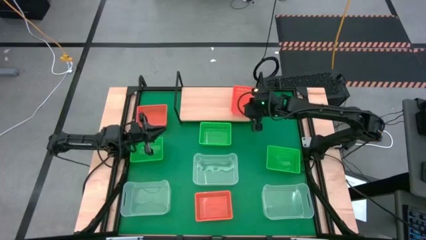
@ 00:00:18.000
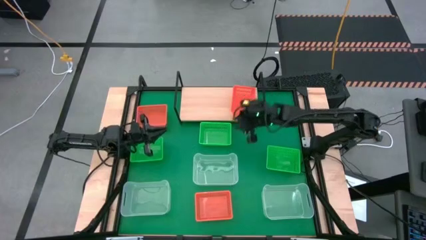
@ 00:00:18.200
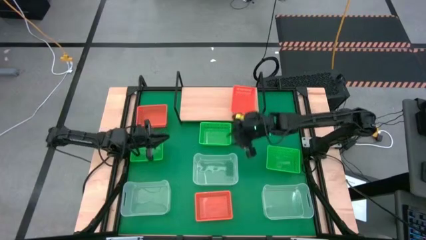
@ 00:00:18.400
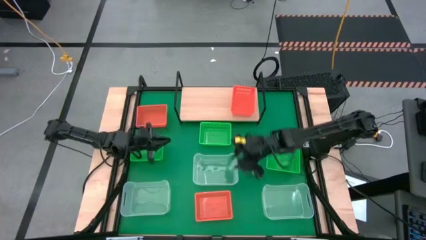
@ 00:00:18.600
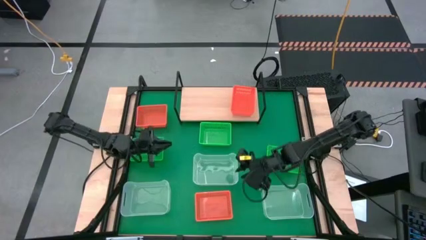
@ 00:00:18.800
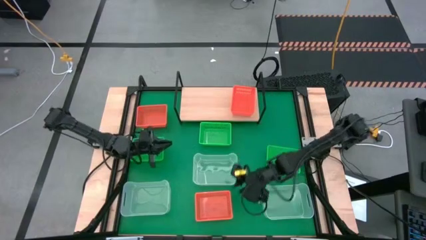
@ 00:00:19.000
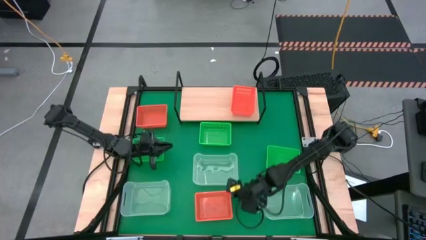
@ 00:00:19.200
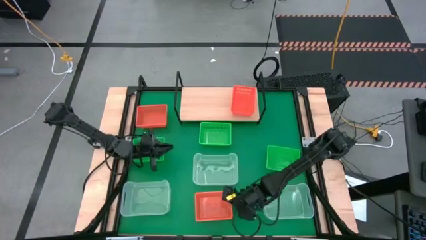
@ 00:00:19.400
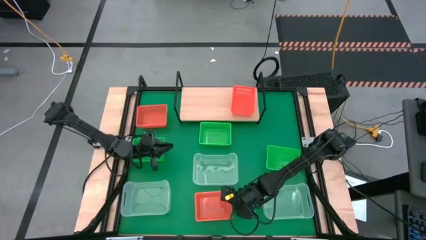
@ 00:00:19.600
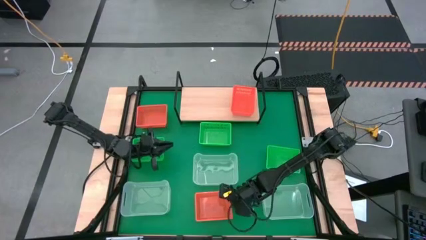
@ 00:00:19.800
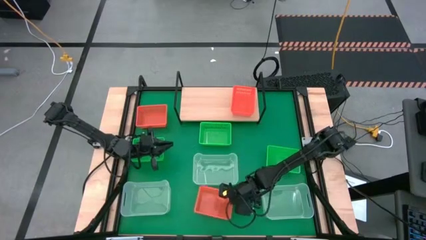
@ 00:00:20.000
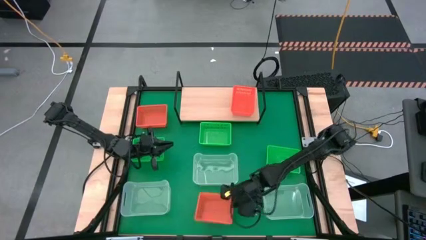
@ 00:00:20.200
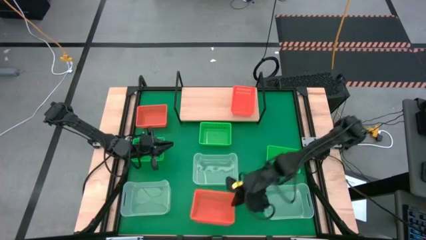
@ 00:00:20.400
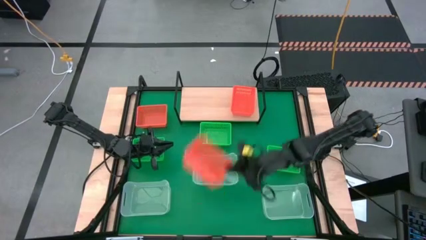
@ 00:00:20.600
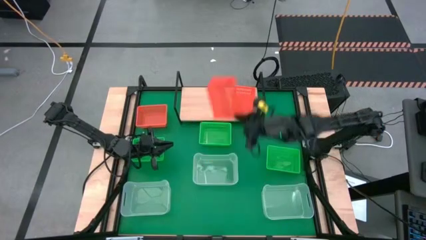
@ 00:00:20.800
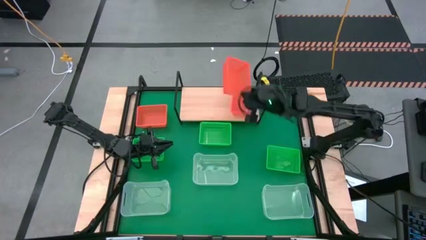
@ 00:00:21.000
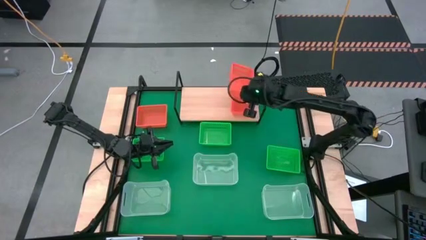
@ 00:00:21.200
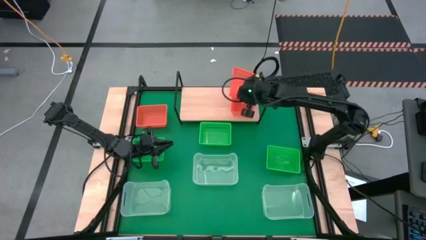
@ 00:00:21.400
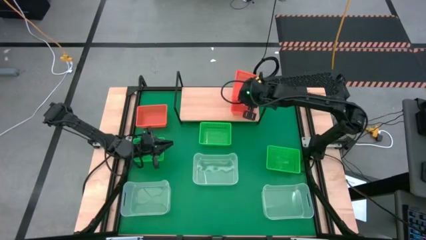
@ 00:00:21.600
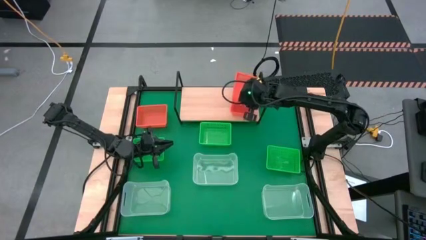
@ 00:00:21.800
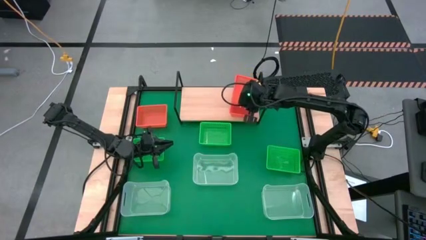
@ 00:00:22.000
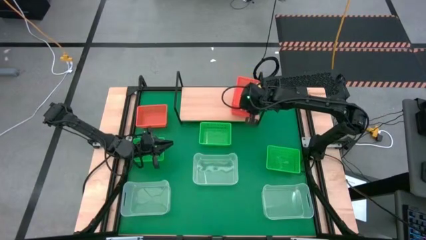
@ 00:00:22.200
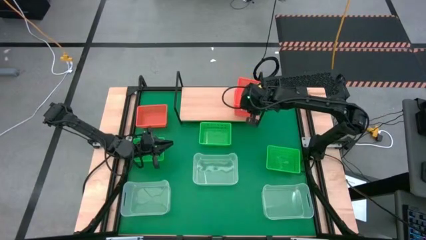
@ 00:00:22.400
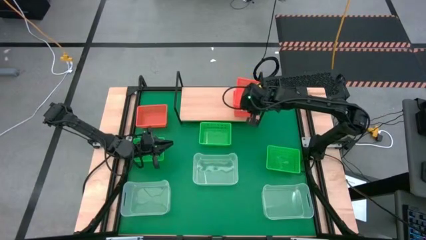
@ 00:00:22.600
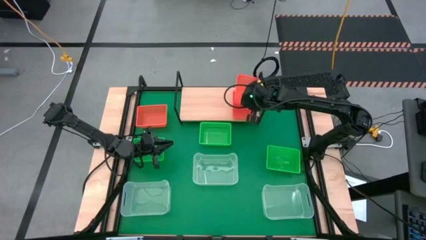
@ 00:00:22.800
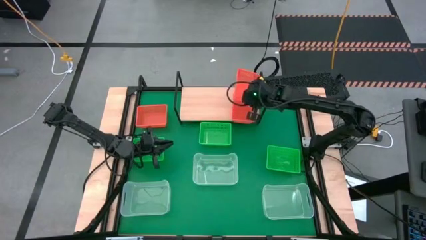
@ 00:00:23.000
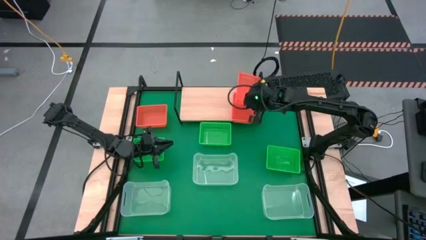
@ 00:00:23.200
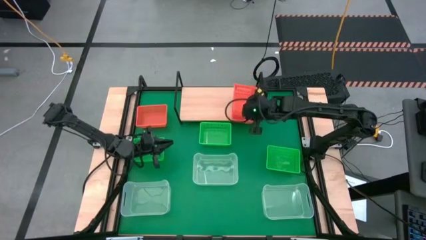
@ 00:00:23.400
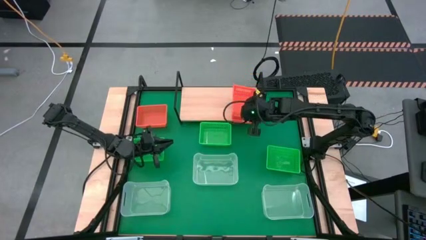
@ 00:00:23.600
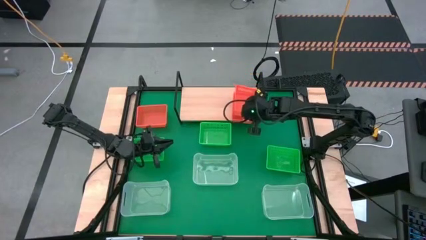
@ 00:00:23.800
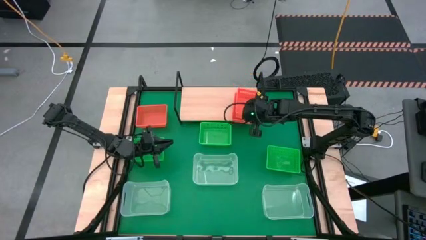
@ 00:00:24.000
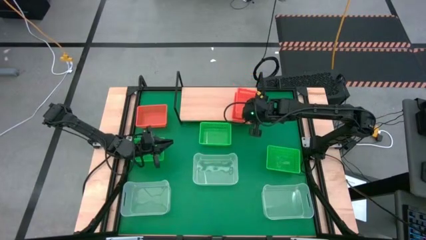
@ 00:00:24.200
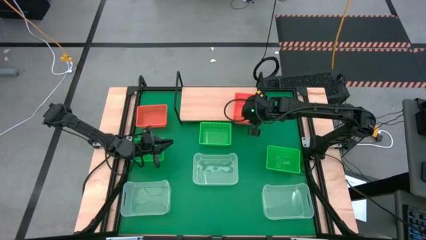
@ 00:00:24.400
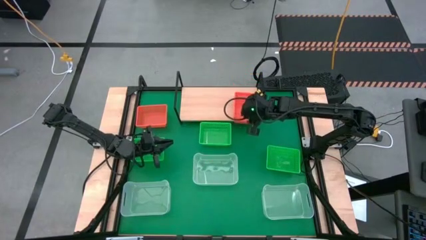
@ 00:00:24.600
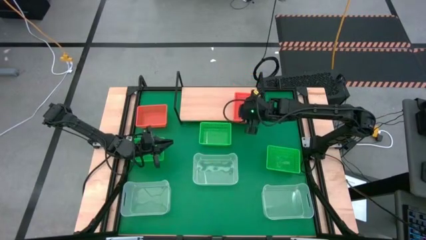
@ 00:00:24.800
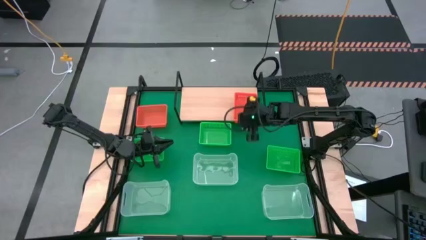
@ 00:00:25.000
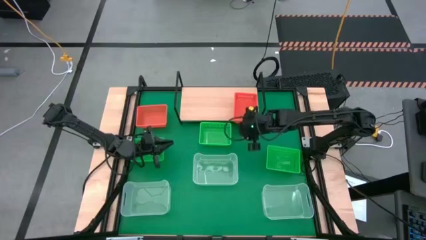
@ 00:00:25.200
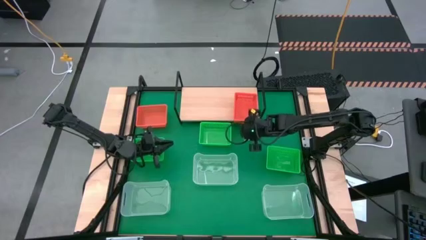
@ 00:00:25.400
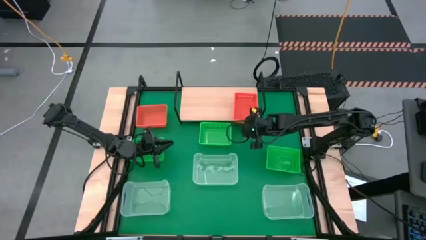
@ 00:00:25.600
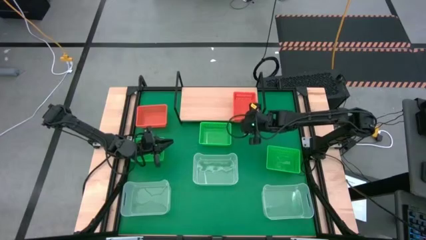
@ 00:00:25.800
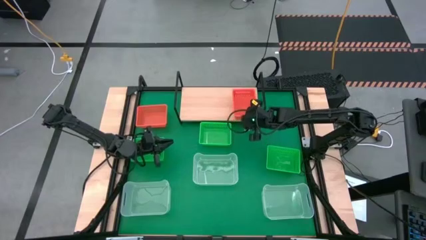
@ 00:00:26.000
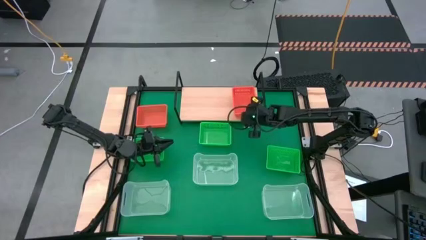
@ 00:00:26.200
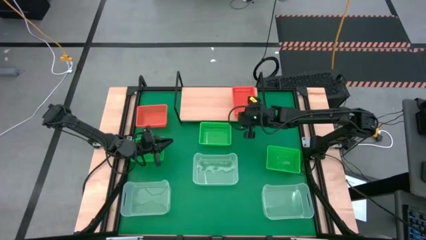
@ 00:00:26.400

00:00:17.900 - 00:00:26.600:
Task: Stack baskets on shelf by color
Stack the bottom orange bin on top of the orange bin on the shelf

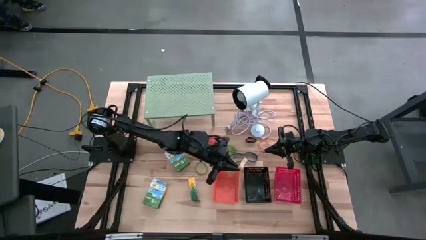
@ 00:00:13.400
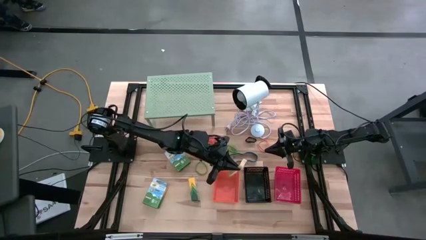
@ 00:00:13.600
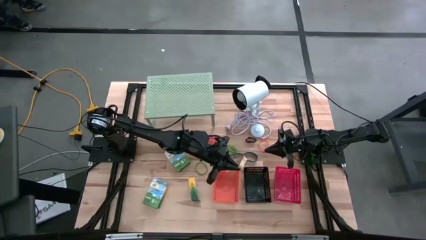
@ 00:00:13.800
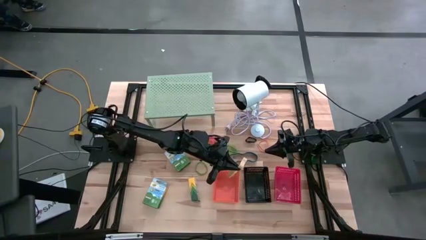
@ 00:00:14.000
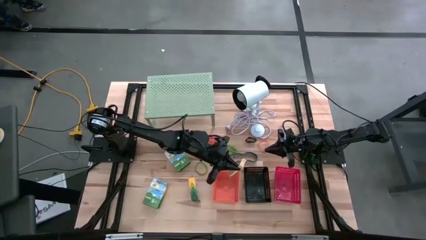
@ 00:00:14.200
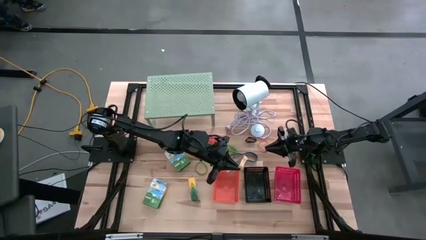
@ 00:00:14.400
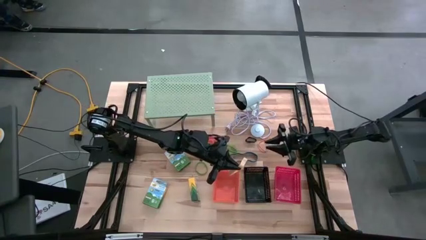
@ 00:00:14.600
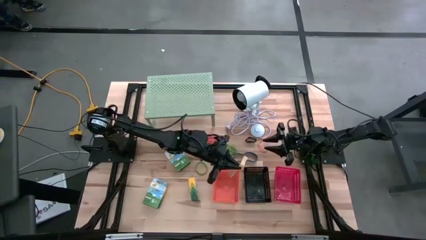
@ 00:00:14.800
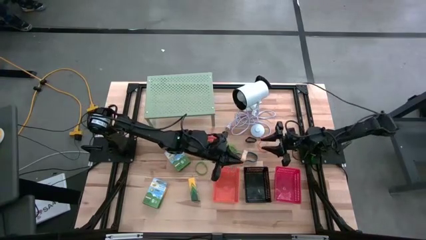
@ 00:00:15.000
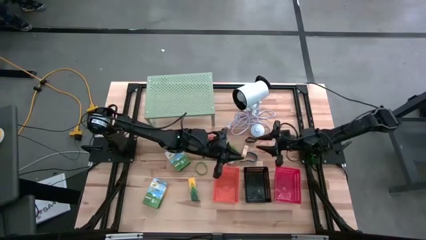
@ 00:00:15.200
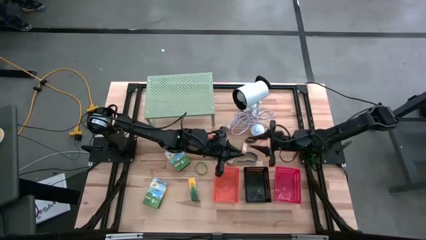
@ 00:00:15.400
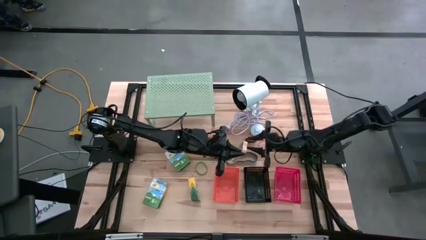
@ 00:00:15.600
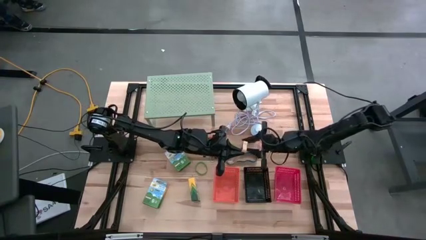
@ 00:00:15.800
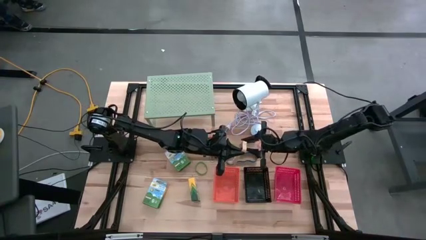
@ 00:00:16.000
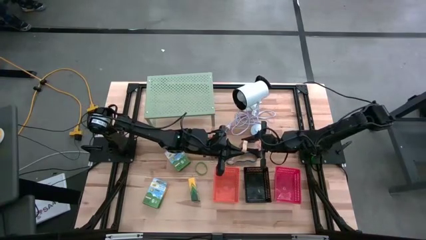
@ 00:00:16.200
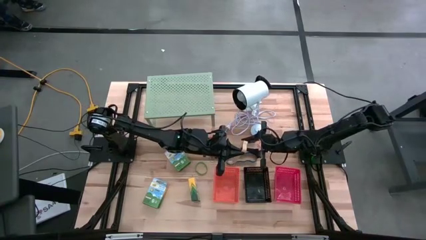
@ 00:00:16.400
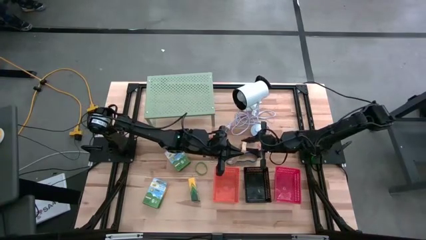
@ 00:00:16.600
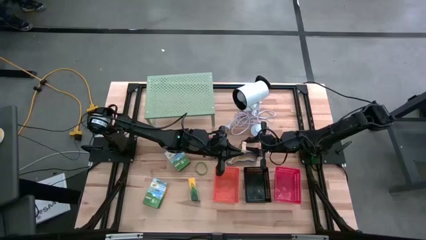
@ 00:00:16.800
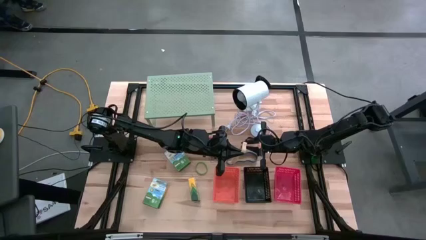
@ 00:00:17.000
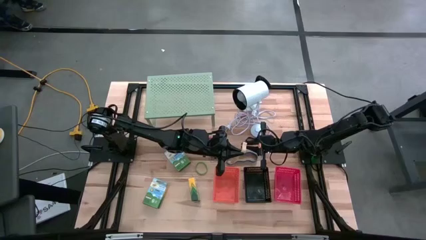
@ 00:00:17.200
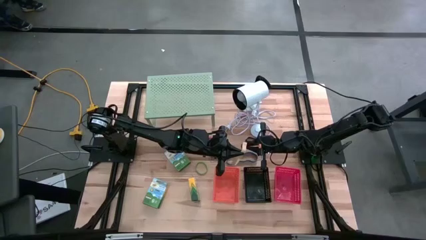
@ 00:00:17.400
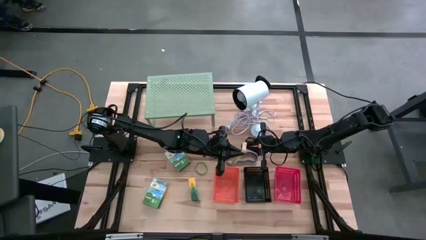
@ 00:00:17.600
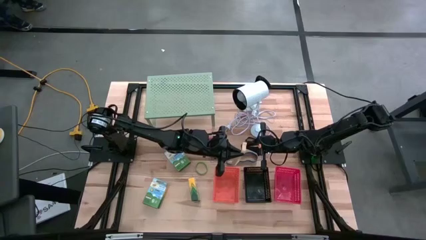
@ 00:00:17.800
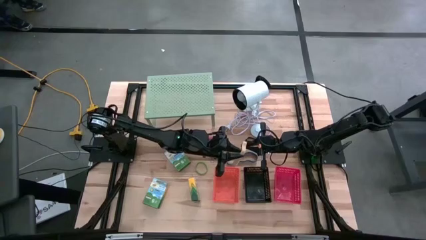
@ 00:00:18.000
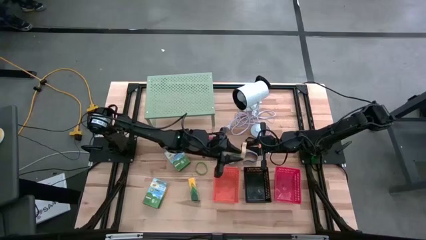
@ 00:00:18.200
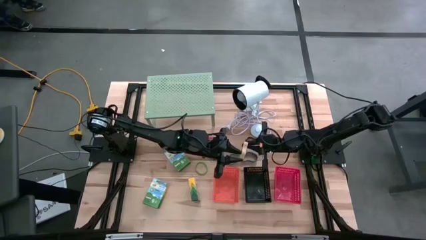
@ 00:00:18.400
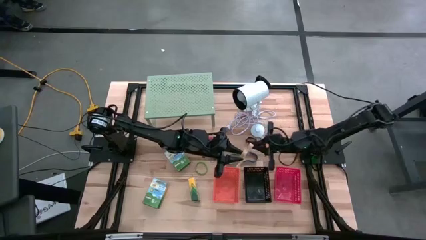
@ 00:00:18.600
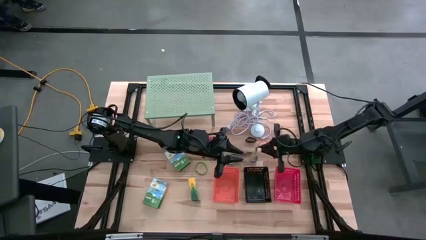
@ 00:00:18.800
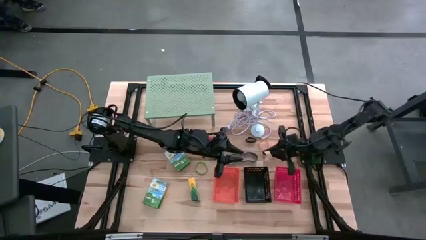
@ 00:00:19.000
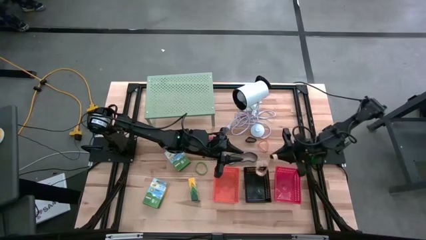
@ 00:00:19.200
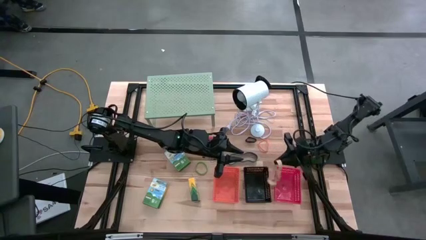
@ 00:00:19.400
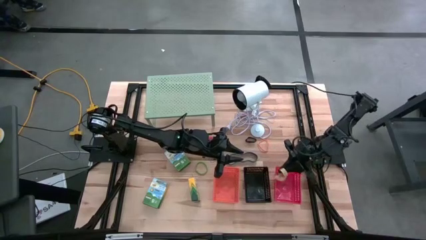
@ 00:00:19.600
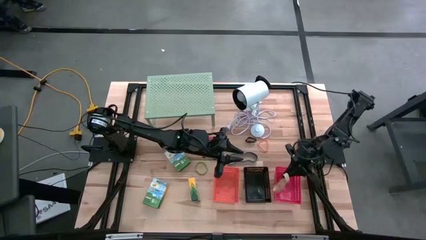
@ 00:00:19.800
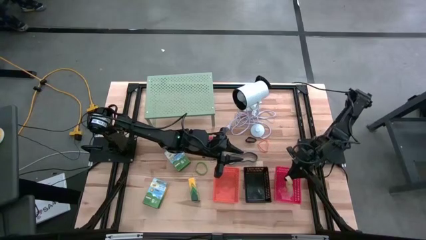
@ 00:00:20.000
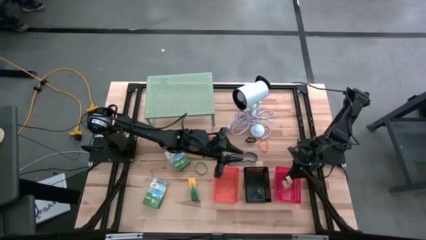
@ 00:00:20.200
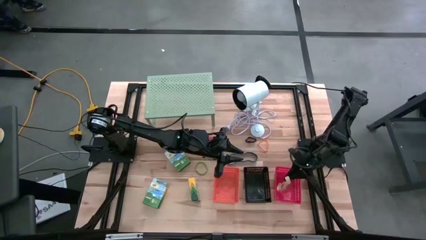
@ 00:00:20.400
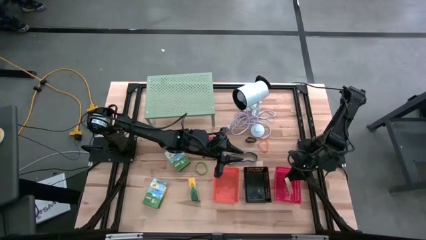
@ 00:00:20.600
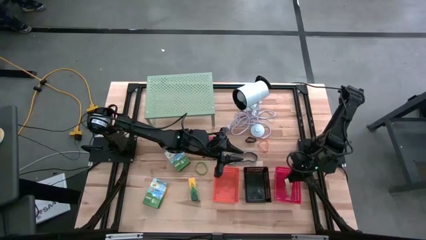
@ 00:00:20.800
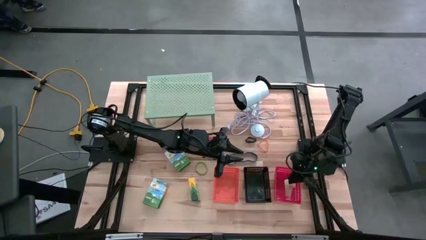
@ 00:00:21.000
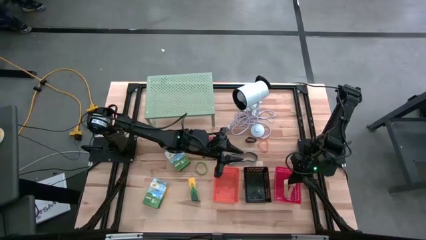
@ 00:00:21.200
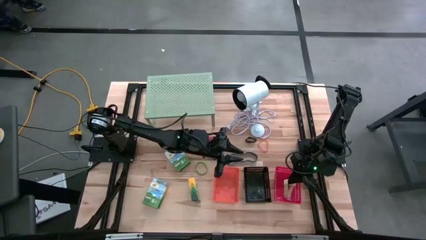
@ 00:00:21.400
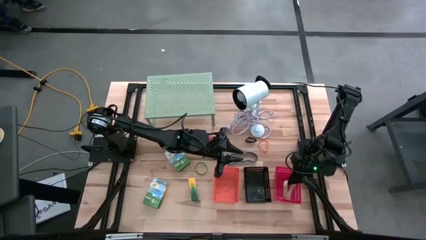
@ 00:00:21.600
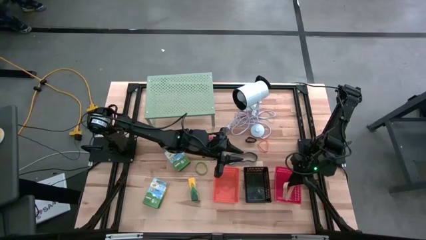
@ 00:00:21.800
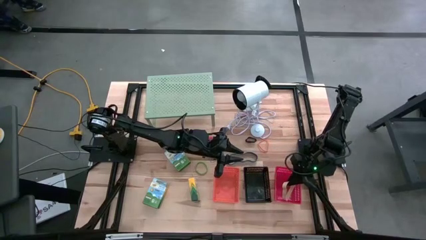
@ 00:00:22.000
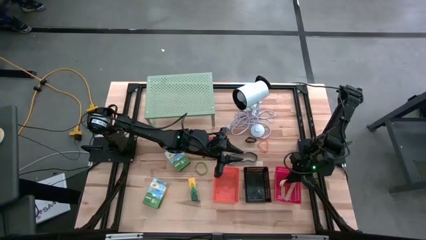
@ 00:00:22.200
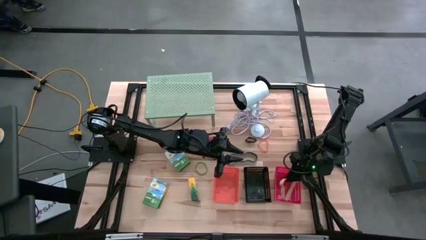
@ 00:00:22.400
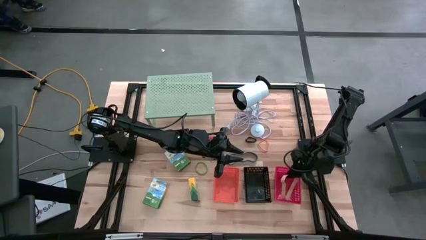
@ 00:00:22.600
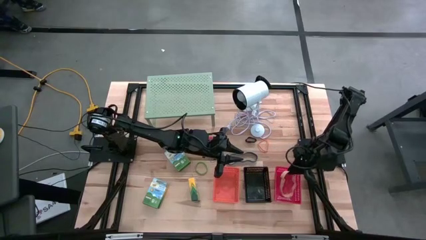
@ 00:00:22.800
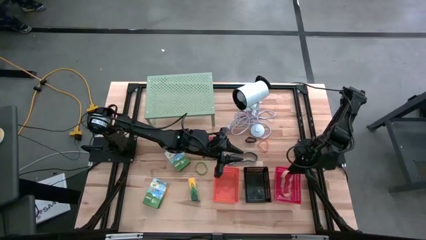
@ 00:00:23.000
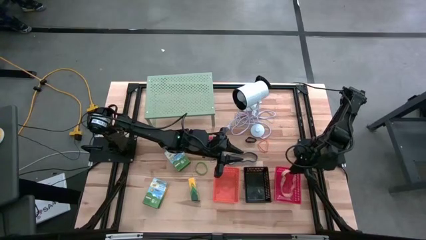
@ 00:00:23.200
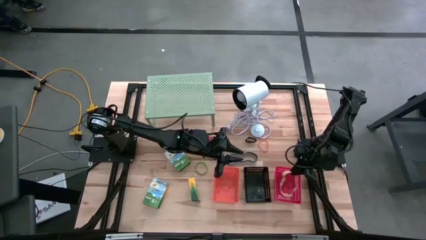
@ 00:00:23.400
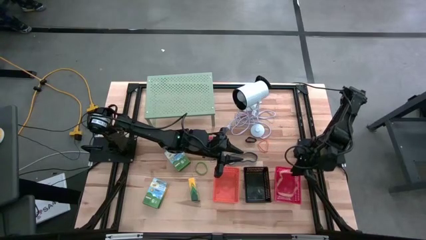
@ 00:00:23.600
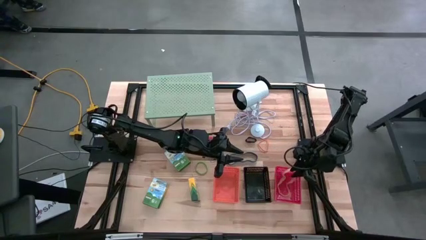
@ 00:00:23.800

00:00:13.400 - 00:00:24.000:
Task: Pick & Place Office Desk Supplies
Put the brown rubber band into the red basket
